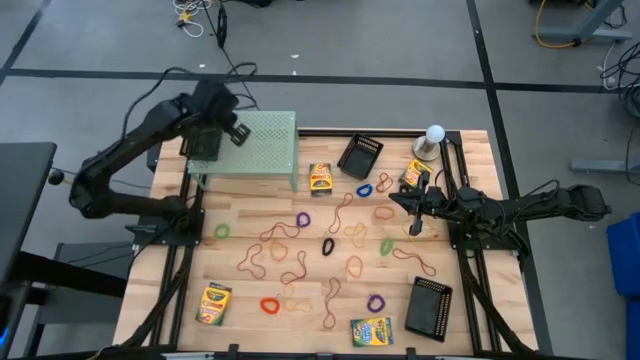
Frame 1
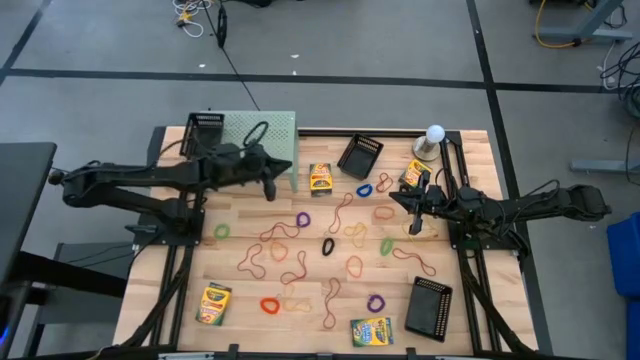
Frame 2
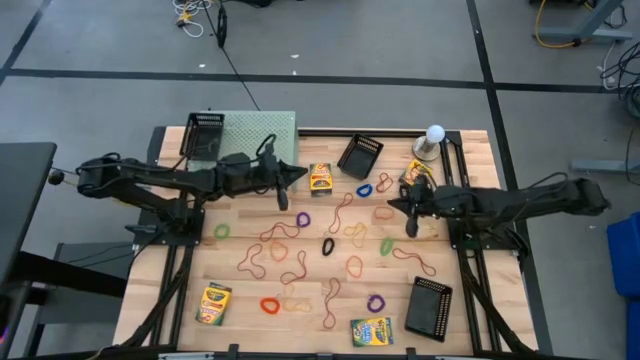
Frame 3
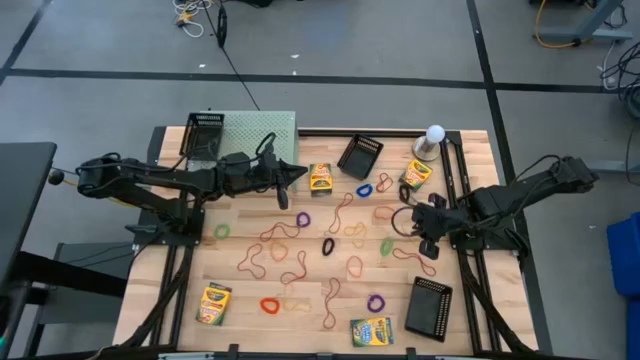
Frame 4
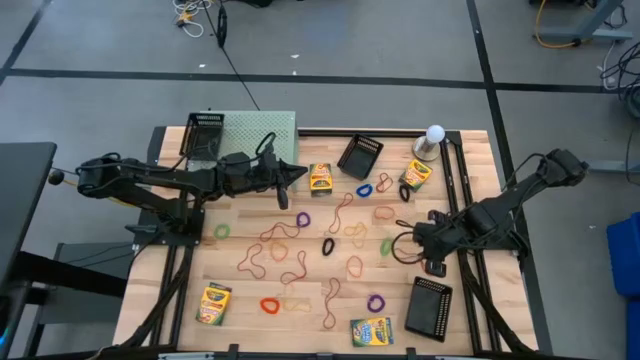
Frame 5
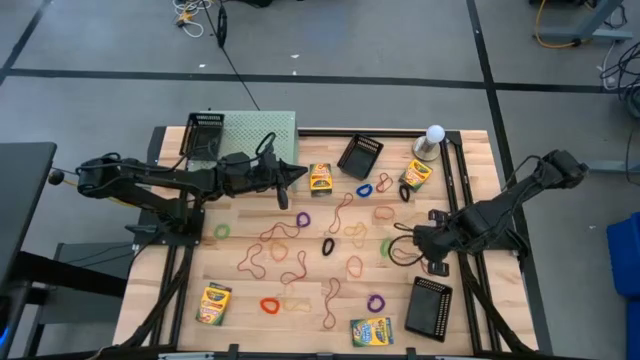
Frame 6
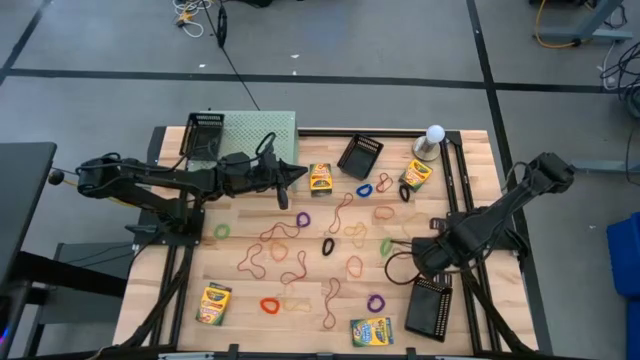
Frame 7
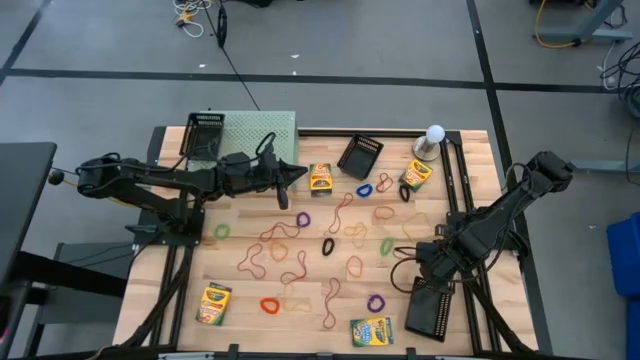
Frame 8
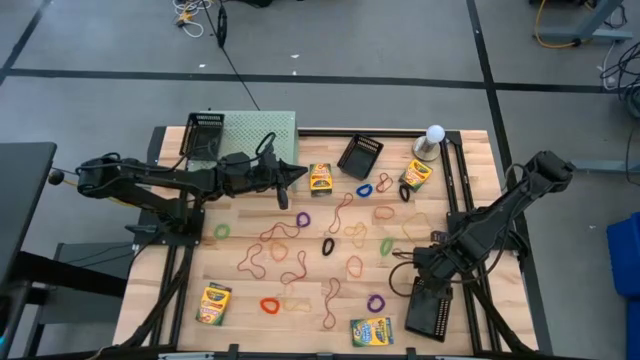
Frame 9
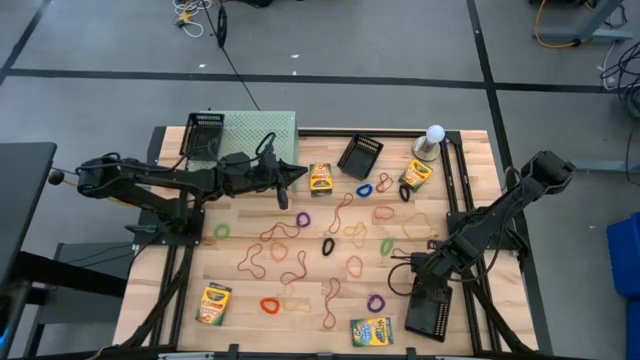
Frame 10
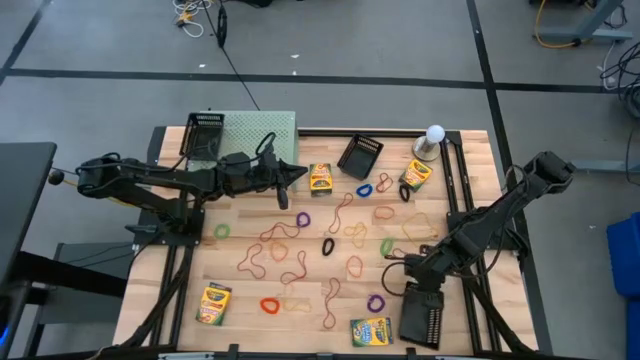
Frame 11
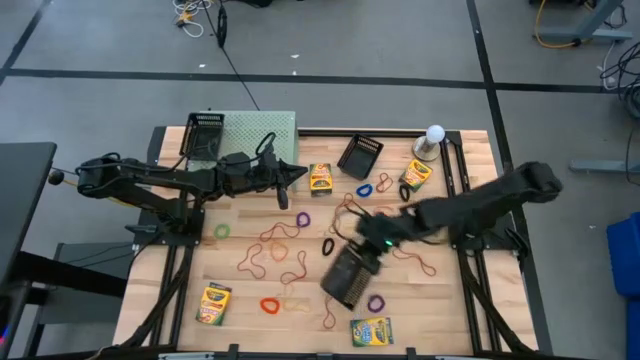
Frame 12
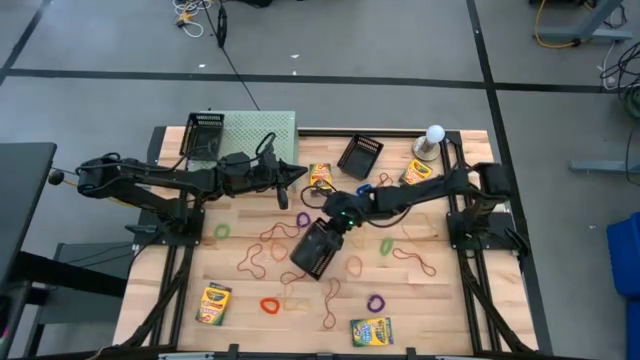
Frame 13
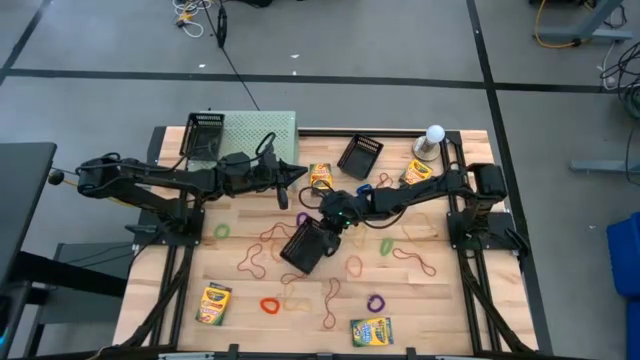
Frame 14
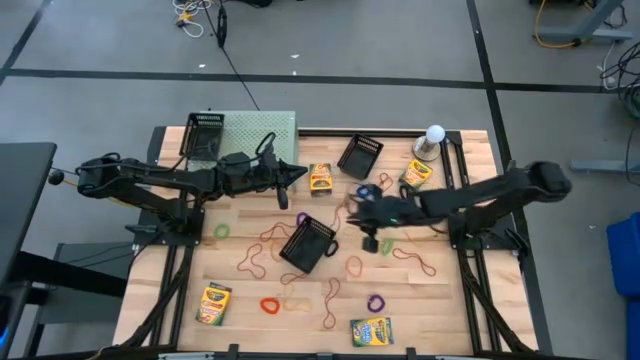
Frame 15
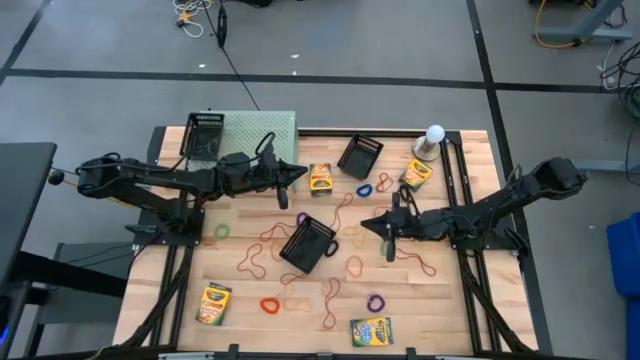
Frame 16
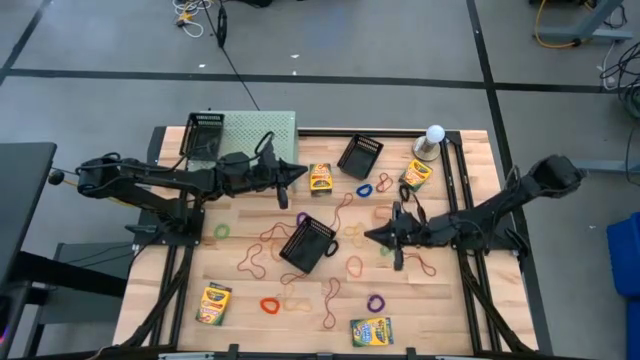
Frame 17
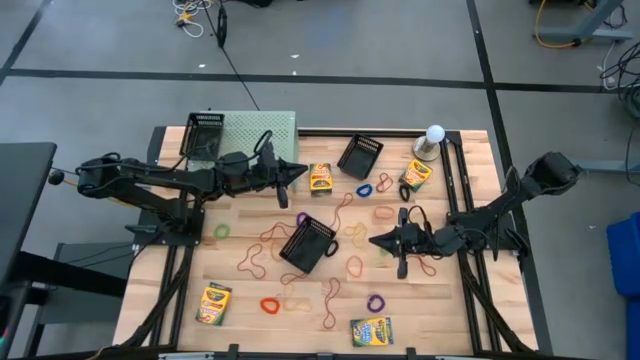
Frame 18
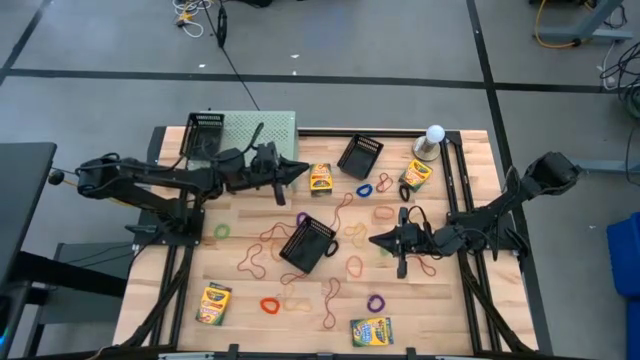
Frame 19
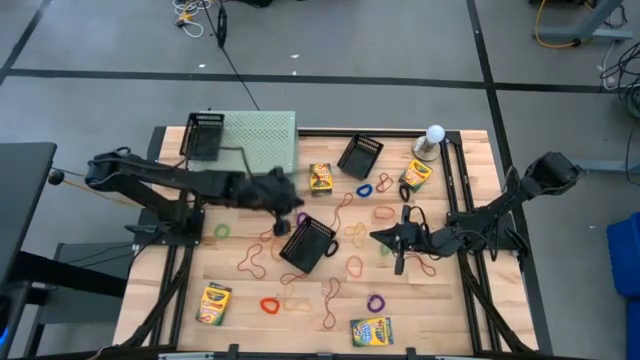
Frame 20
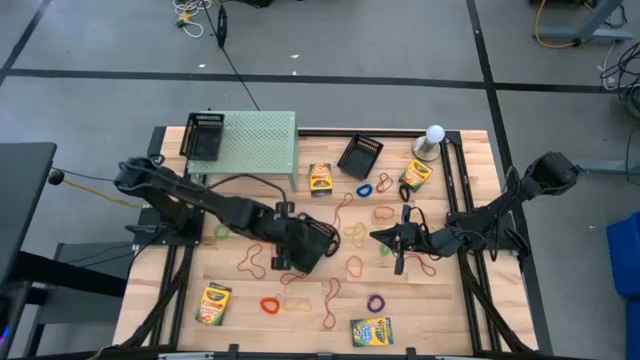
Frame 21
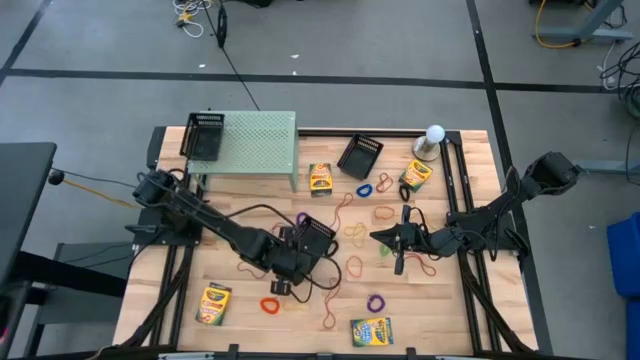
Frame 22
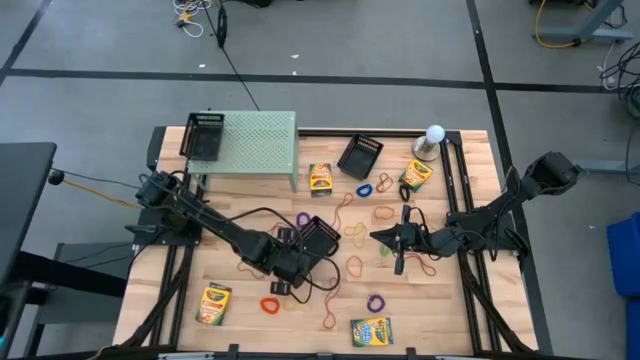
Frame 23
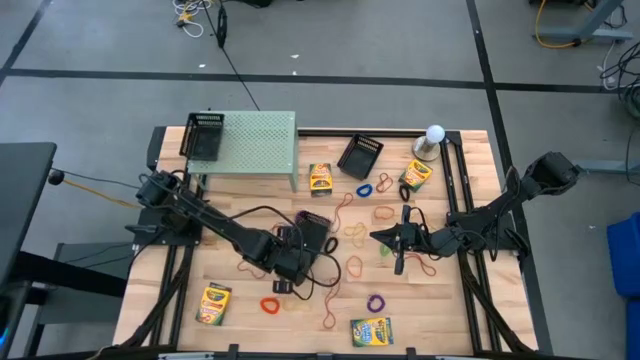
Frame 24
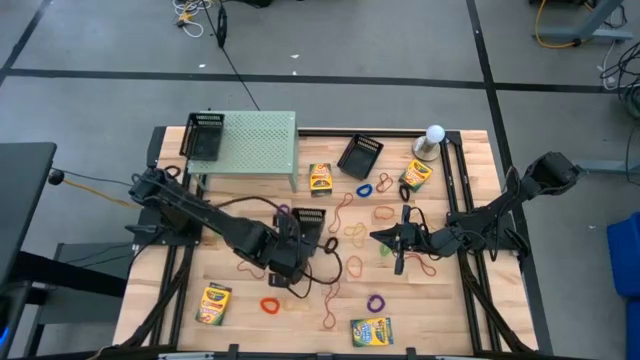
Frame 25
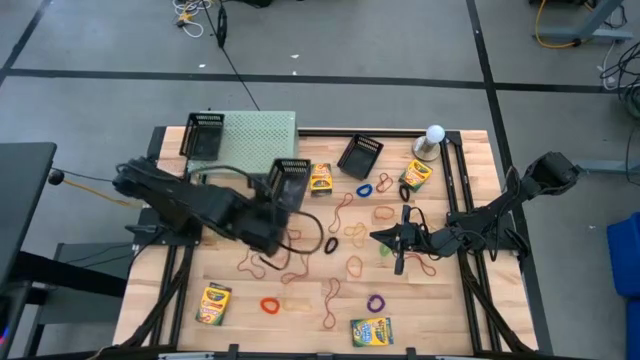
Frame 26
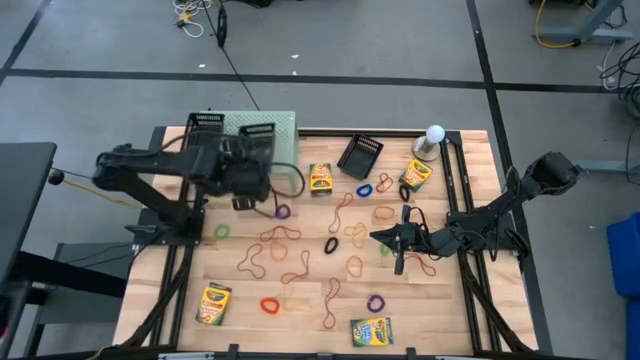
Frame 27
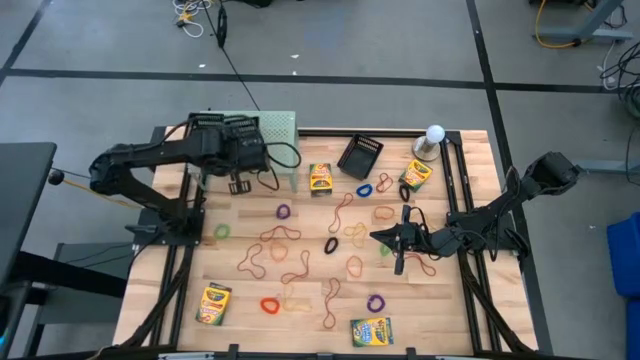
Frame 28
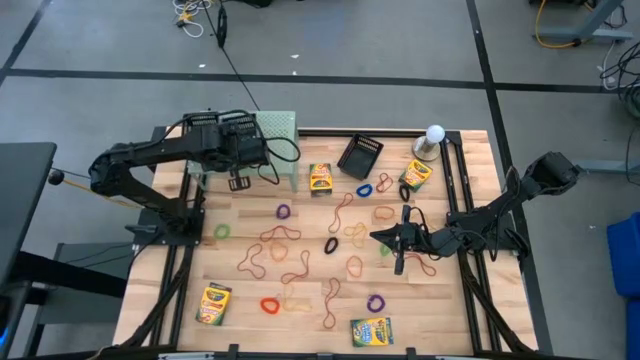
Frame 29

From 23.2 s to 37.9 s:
Task: Pick & Place Office Desk Supplies
Put the black bin on the shelf

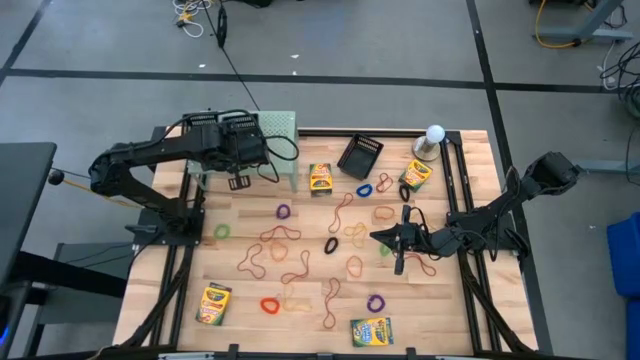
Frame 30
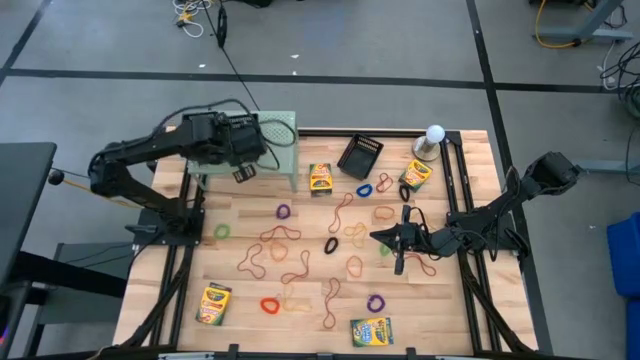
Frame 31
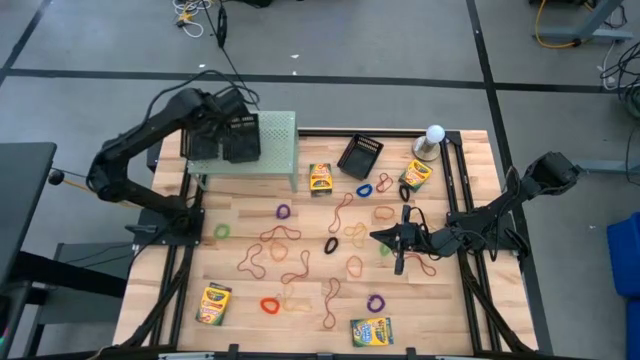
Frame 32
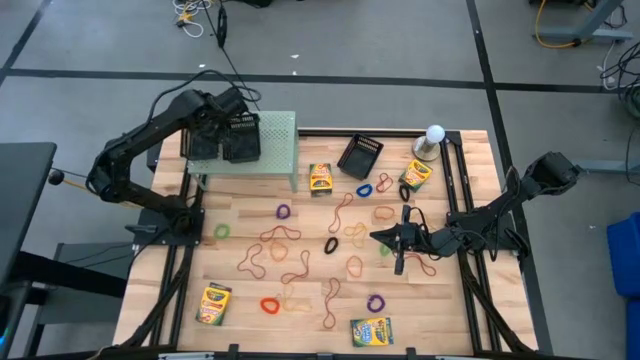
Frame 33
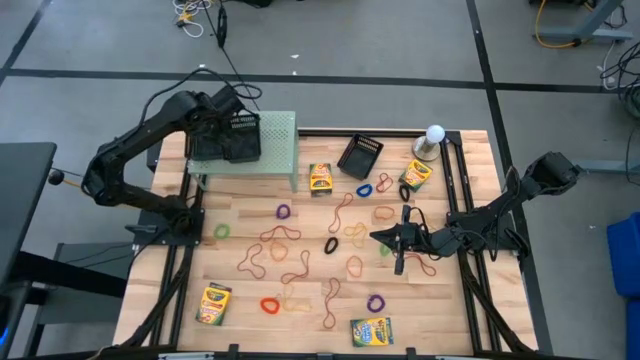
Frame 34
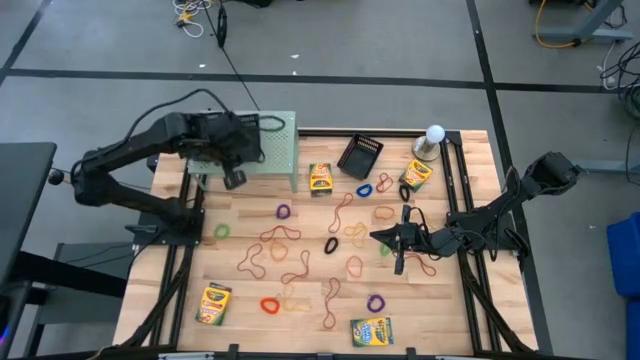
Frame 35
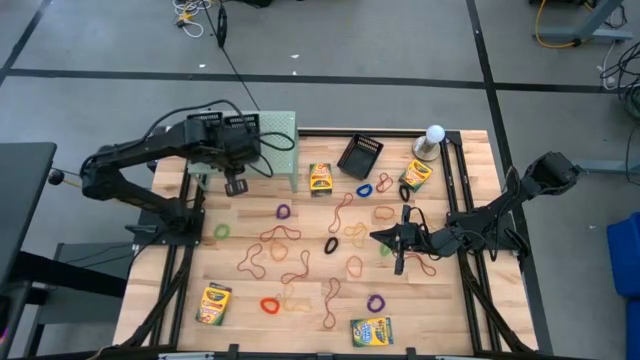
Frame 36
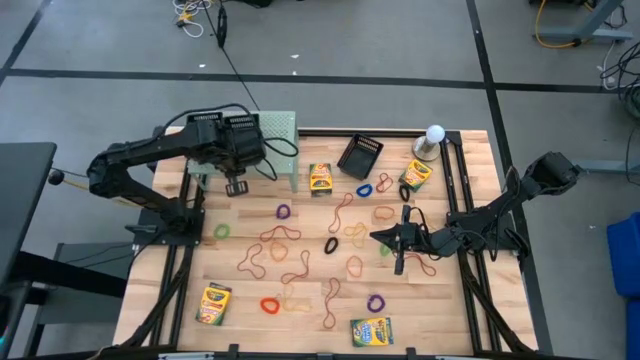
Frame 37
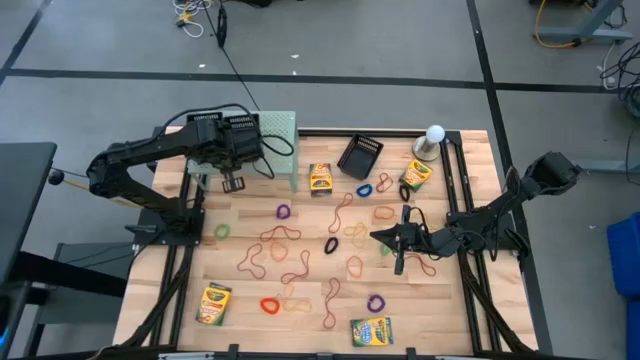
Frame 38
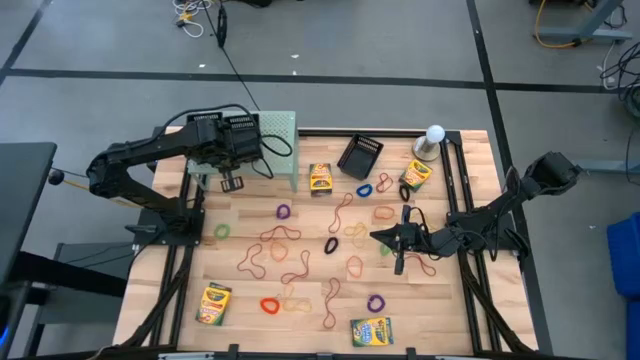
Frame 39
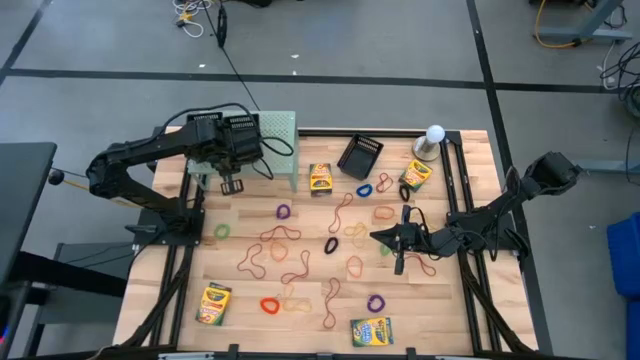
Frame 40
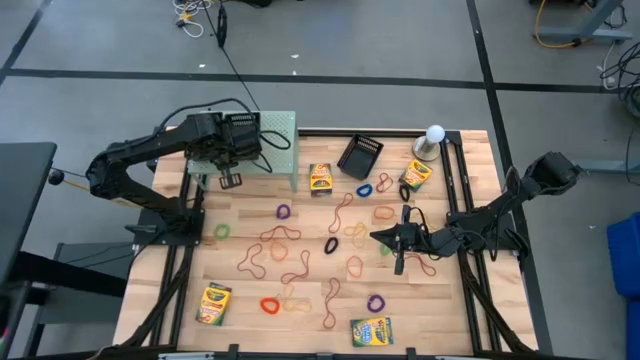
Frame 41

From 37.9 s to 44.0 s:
Adjust the black bins on the shelf
